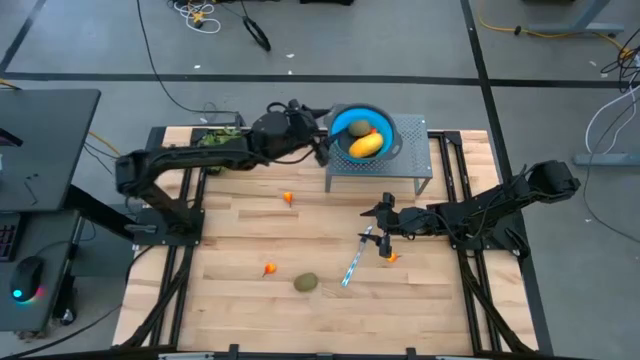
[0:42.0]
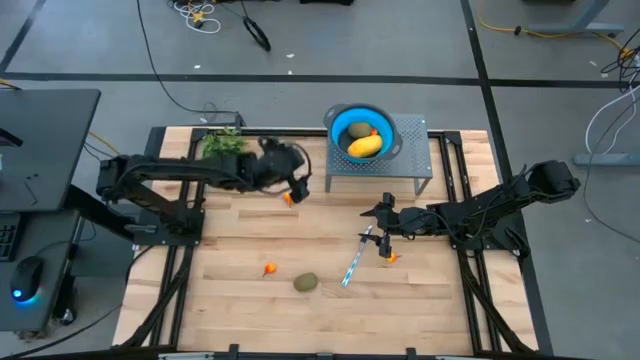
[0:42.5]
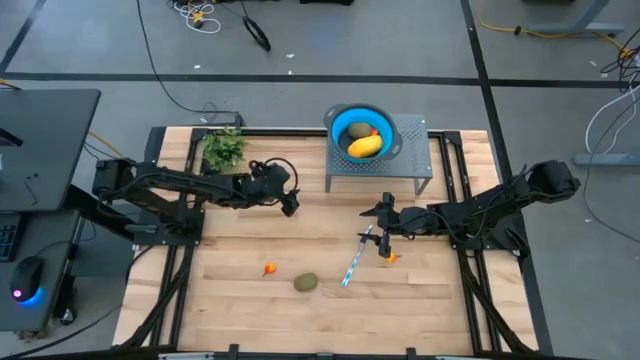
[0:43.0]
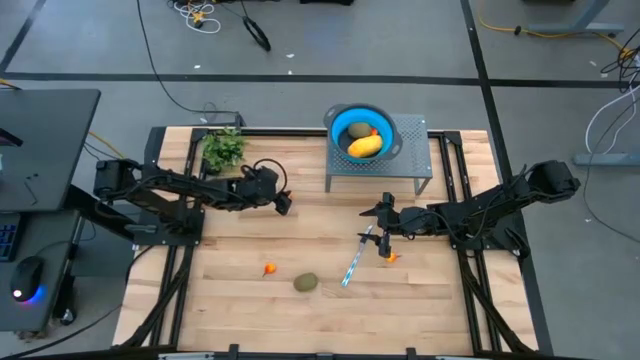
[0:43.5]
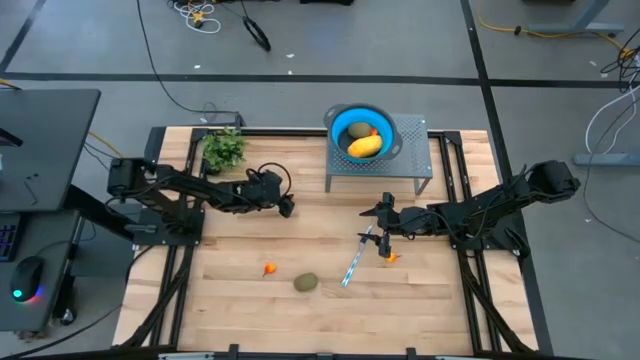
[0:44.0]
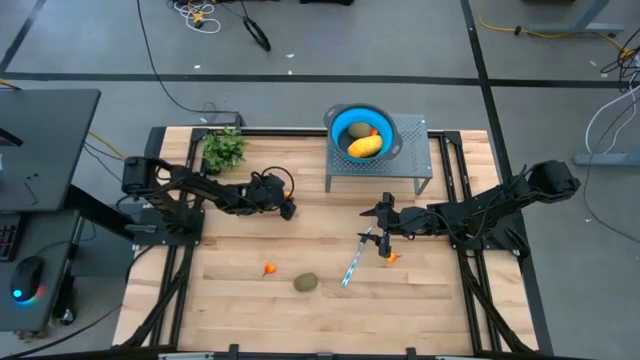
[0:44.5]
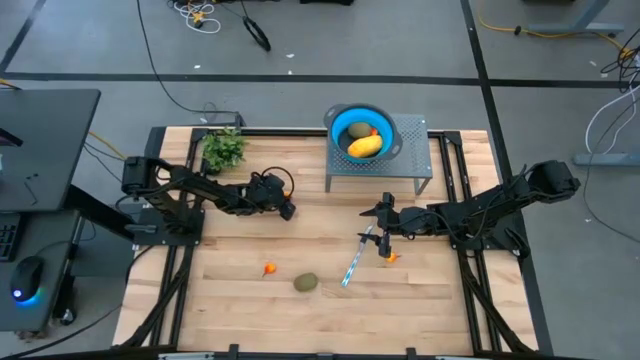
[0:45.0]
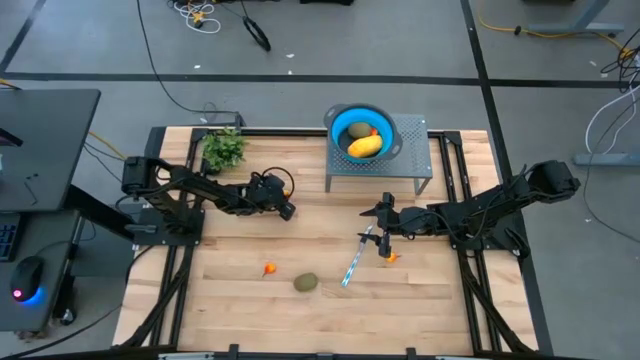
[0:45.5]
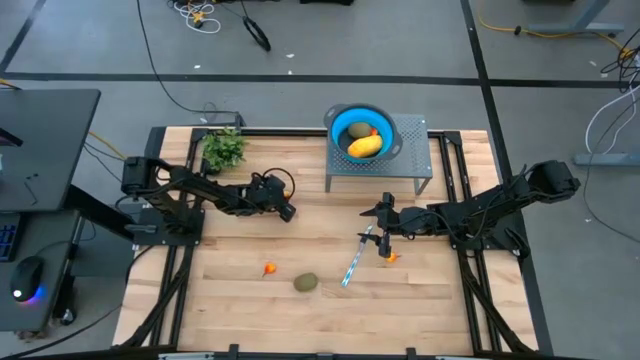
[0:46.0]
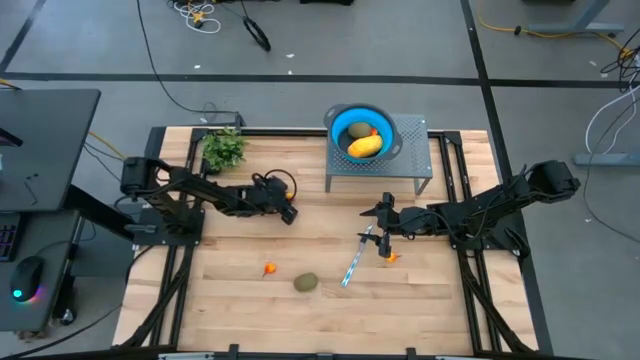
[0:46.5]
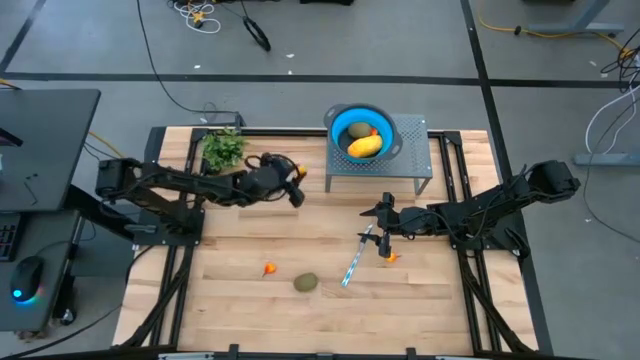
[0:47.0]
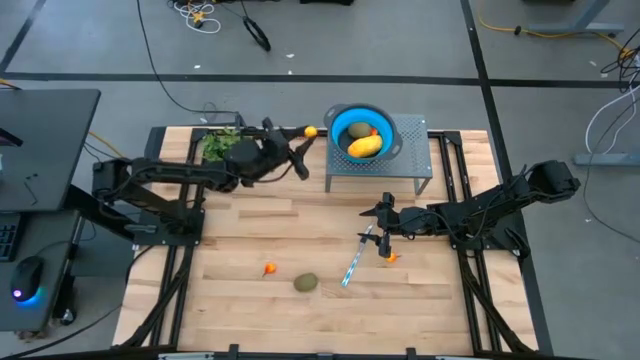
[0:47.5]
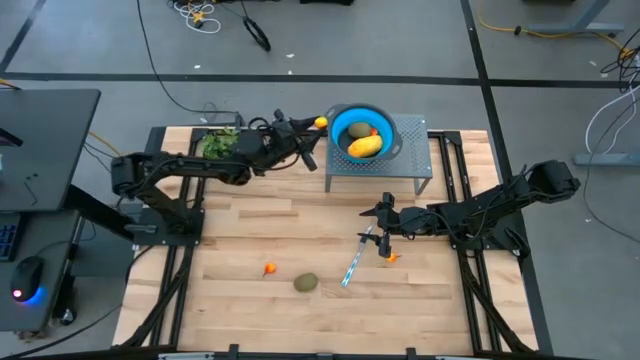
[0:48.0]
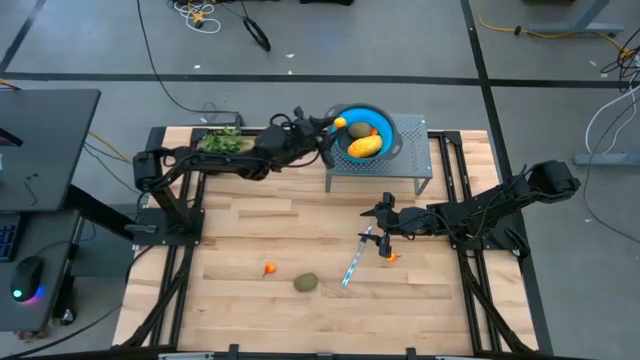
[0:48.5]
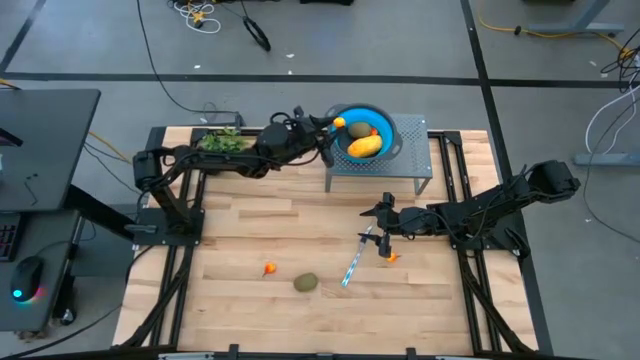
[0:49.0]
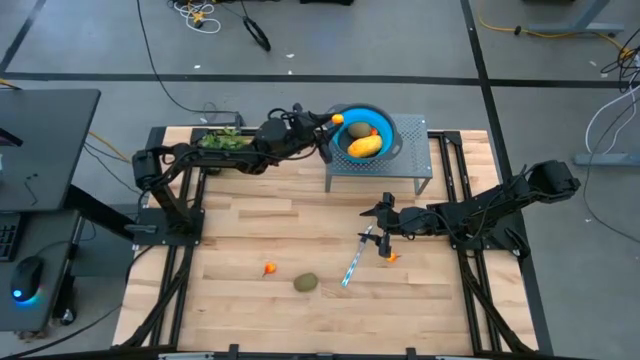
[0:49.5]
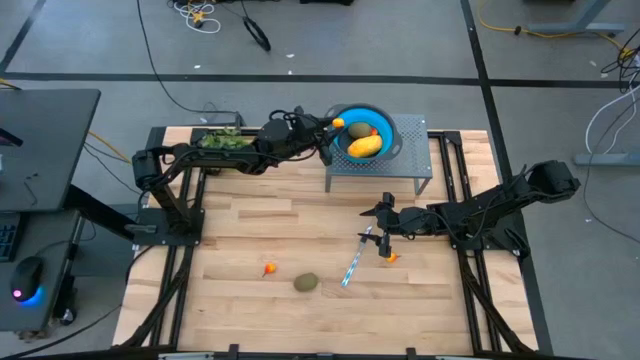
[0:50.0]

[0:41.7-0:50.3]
Task: Pick & Place Fruit
Put the peach into the blue strainer bowl on the shelf

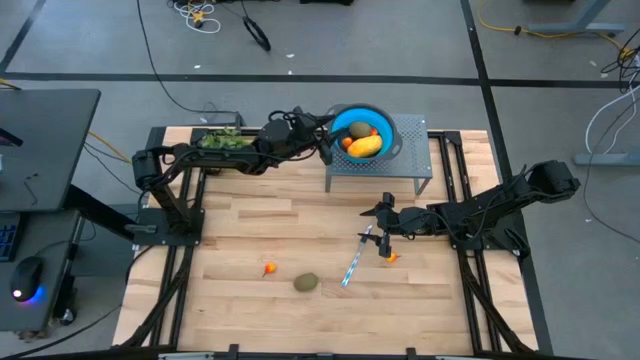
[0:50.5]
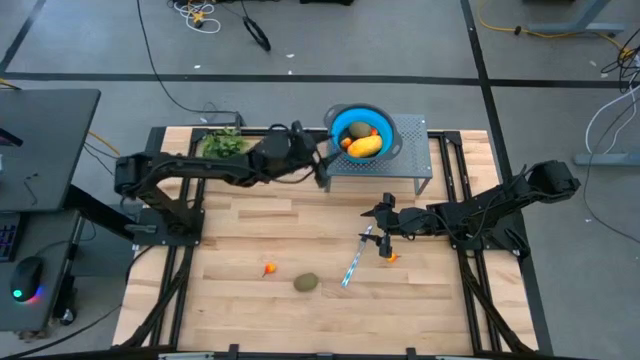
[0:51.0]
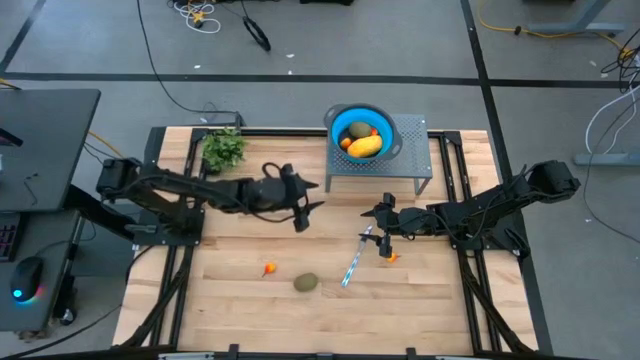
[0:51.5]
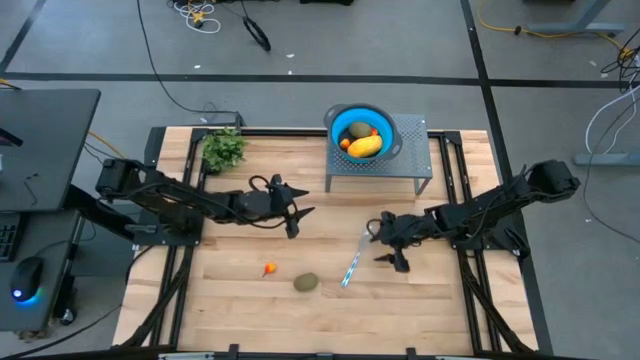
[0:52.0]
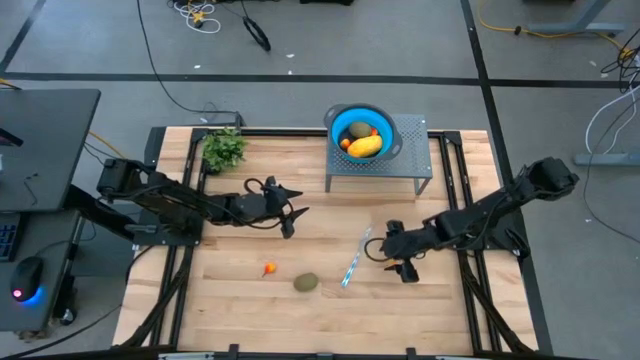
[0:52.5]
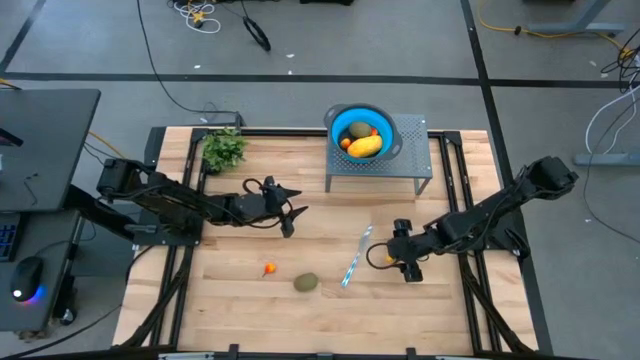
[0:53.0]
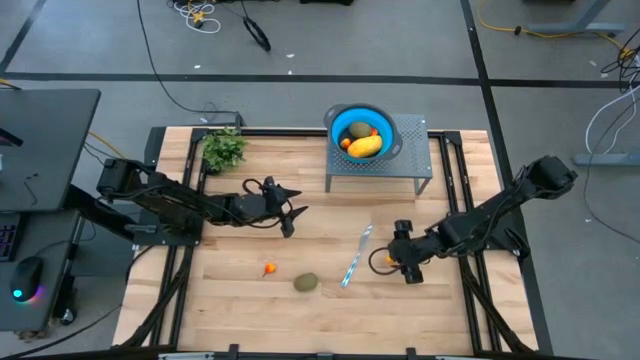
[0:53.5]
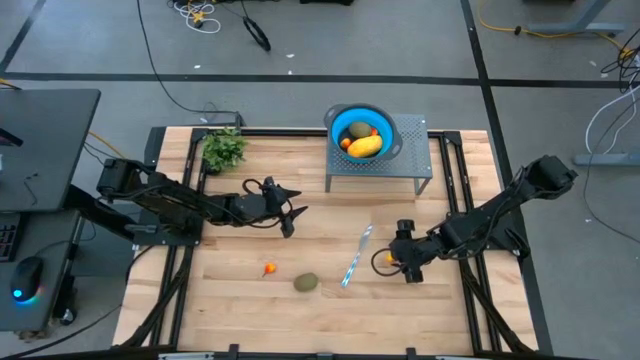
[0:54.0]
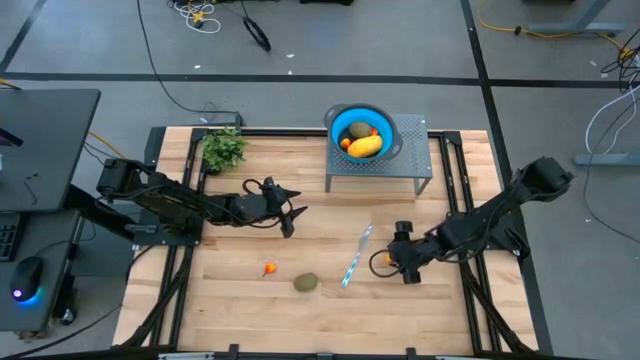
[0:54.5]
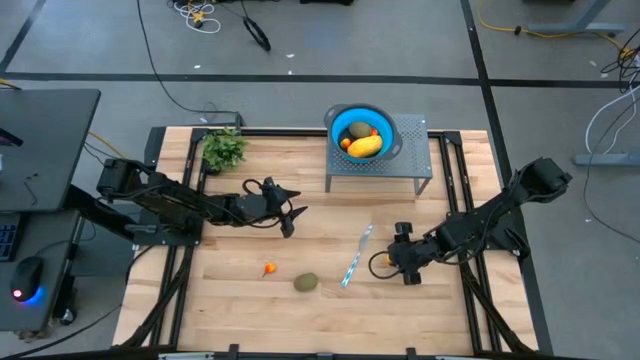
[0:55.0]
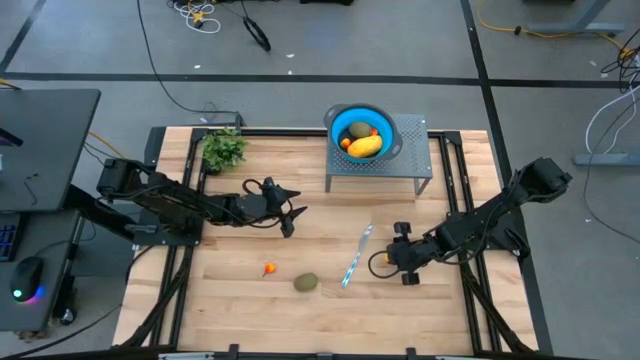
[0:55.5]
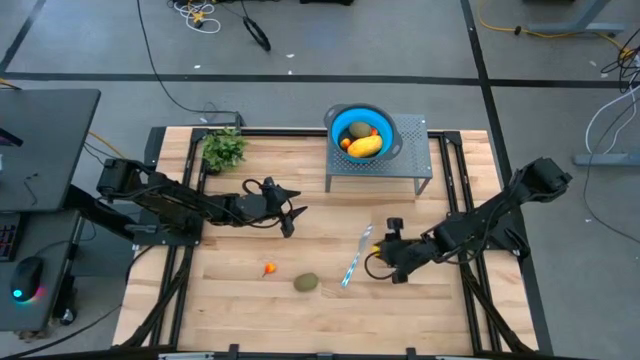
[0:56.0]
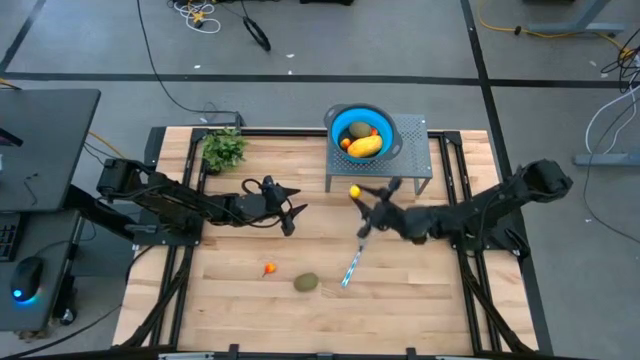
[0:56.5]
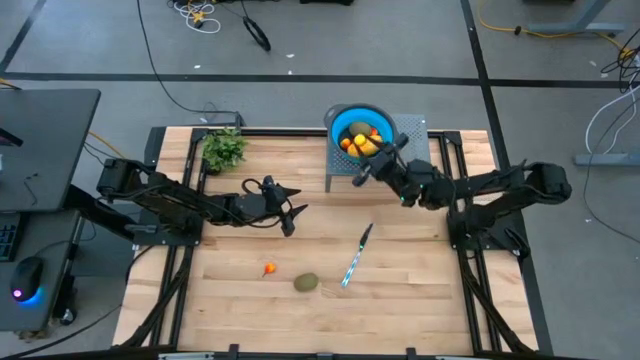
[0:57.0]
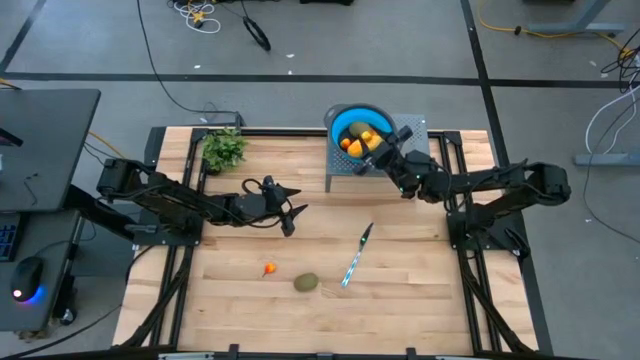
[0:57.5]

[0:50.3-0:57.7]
Put the peach into the blue strainer bowl on the shelf

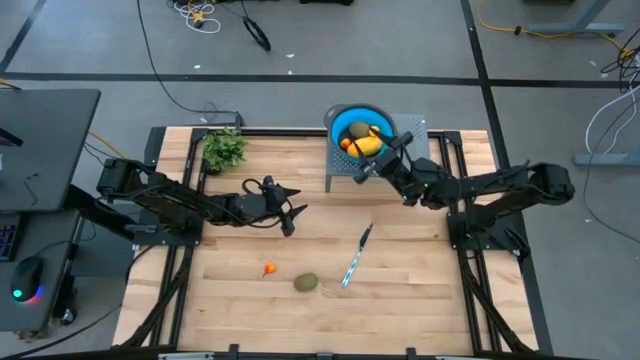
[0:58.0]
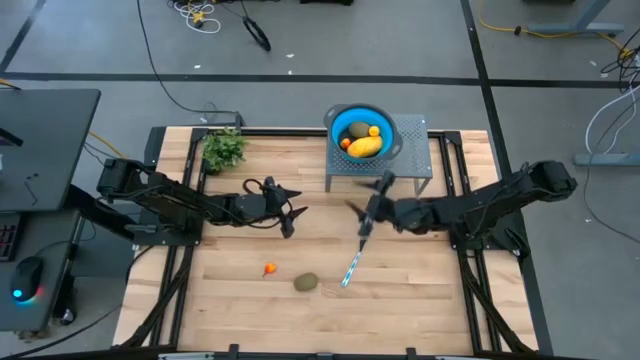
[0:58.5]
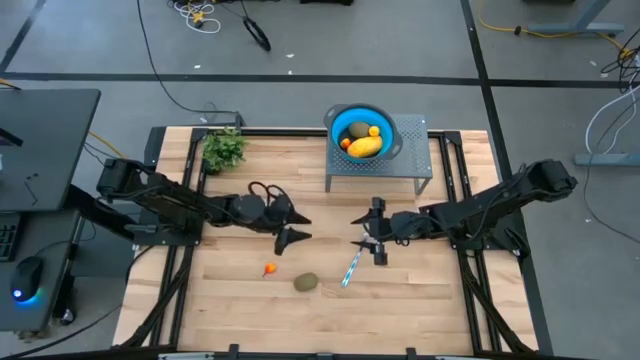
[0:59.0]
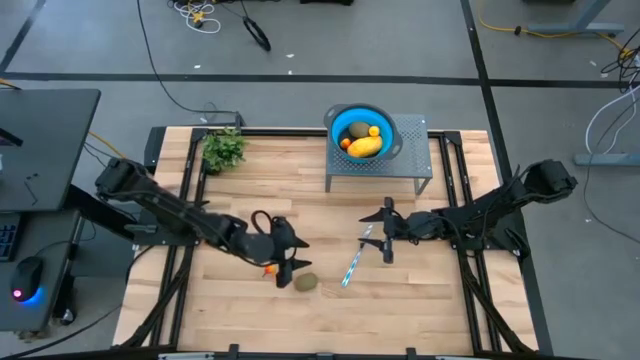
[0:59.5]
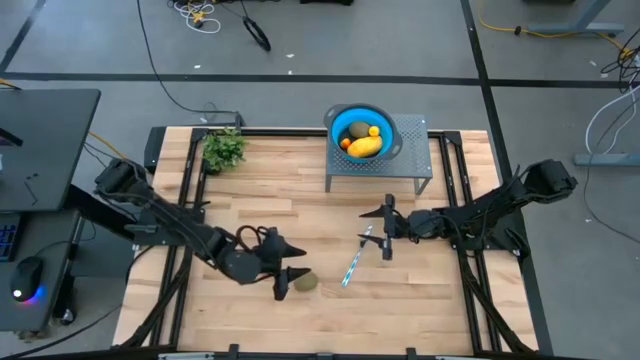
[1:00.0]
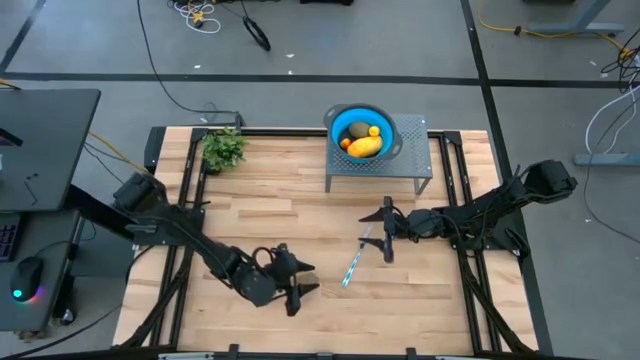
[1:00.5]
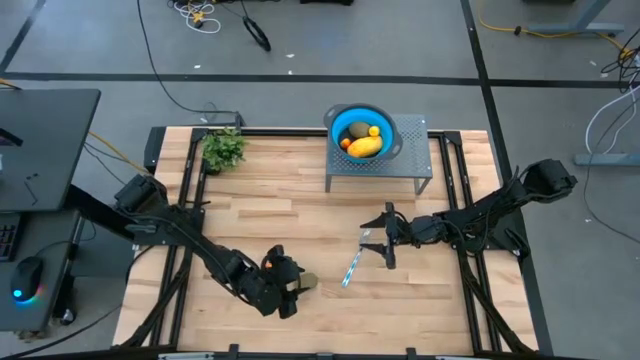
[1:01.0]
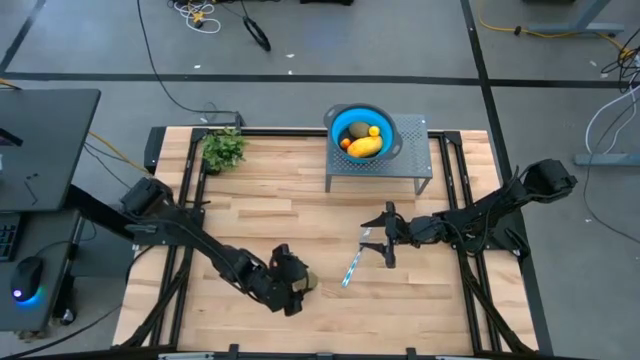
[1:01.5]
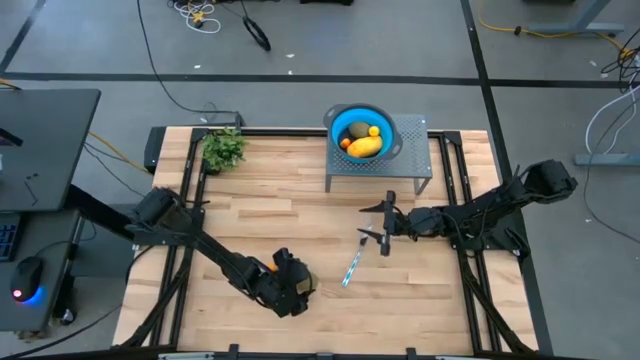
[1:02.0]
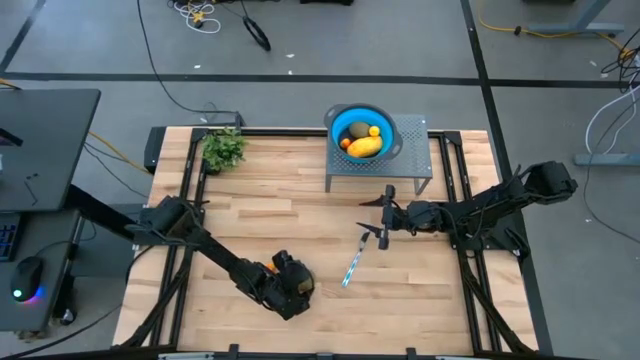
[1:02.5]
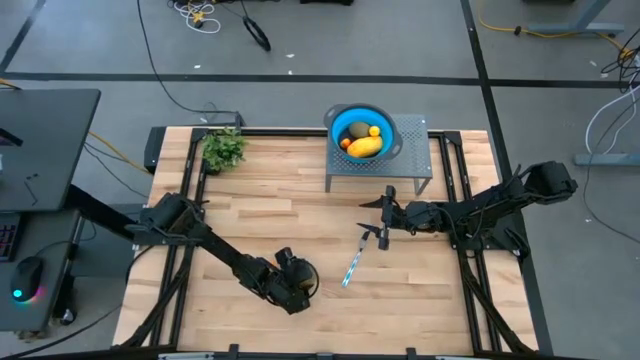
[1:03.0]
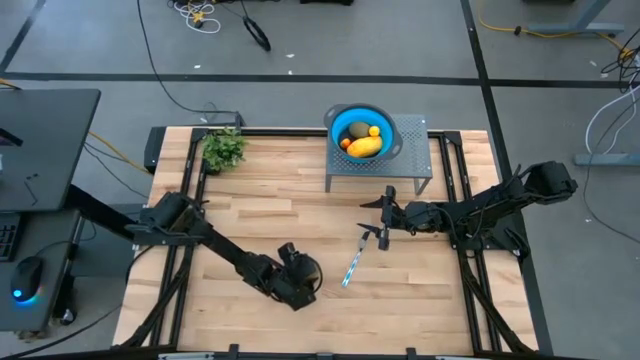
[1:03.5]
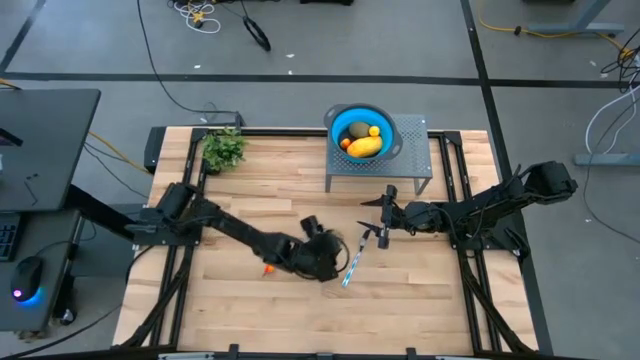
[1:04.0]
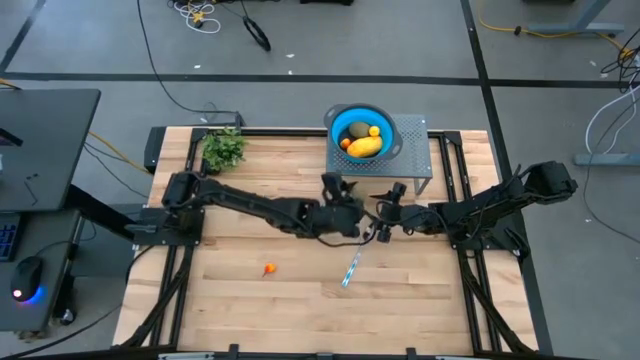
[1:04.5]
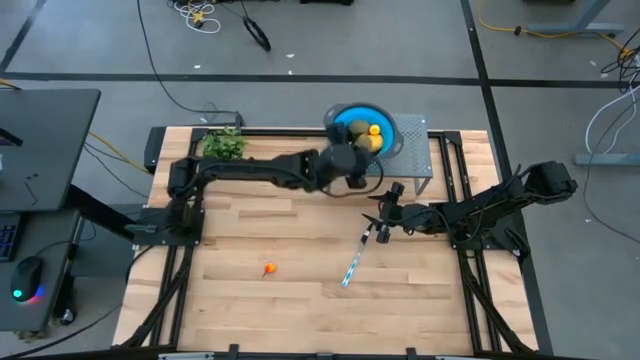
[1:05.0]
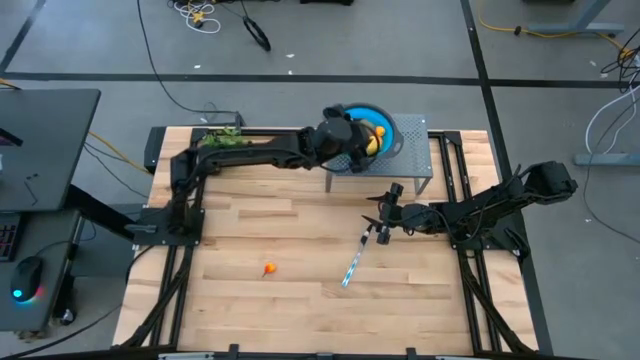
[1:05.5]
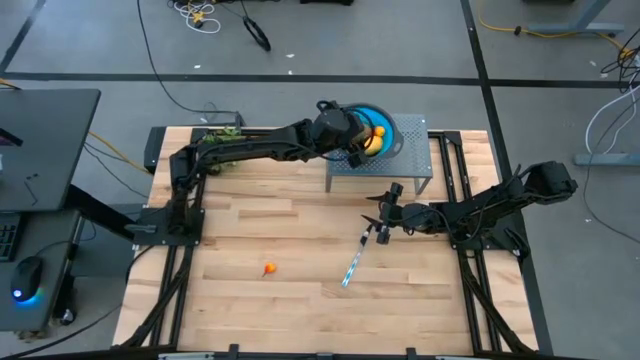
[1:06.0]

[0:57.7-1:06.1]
Put the kiwi into the blue strainer bowl on the shelf
